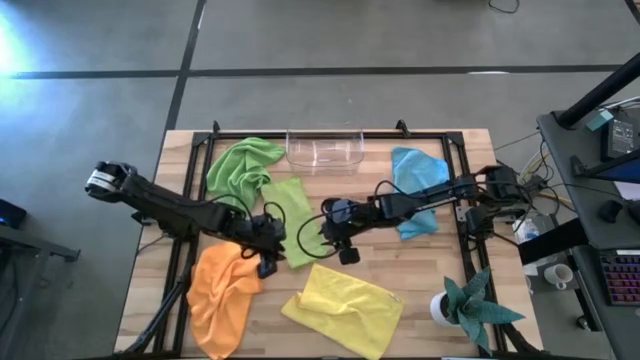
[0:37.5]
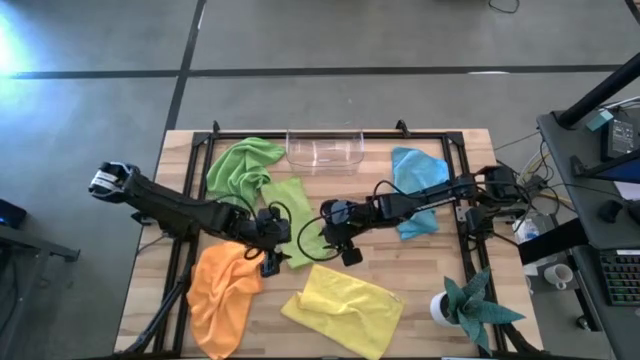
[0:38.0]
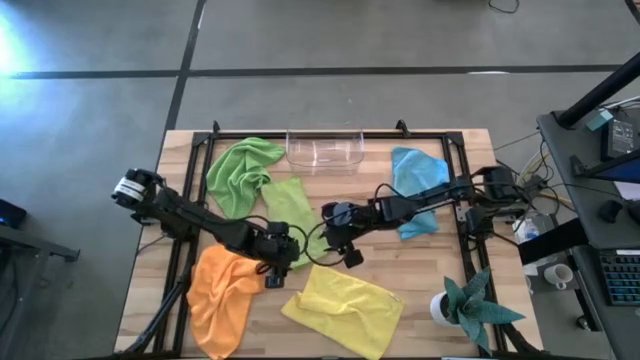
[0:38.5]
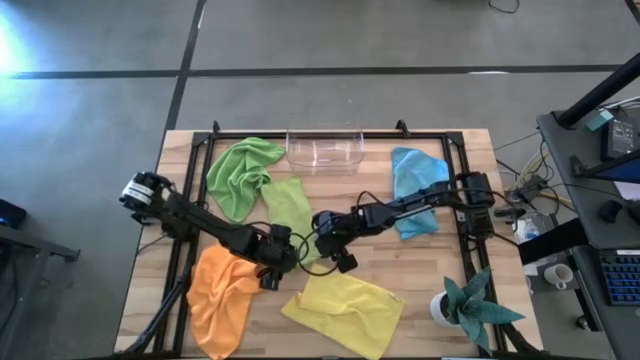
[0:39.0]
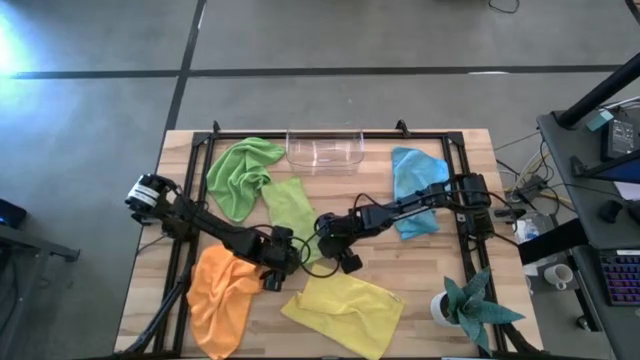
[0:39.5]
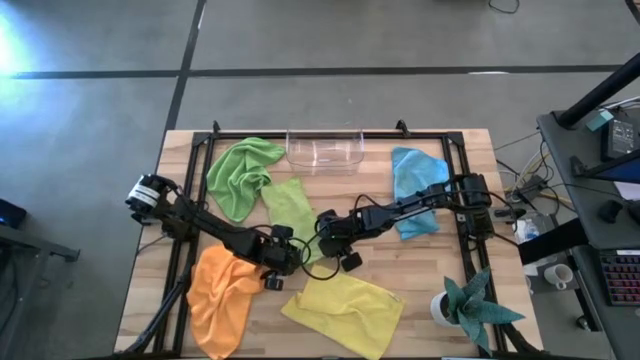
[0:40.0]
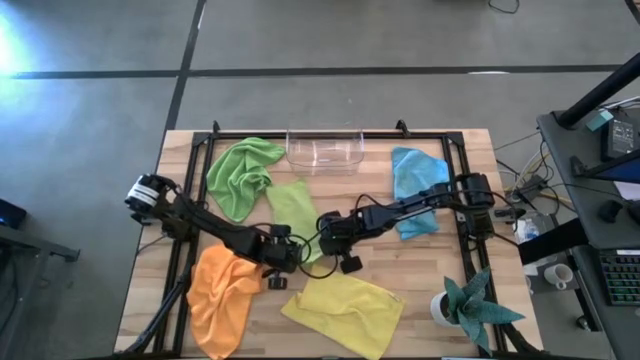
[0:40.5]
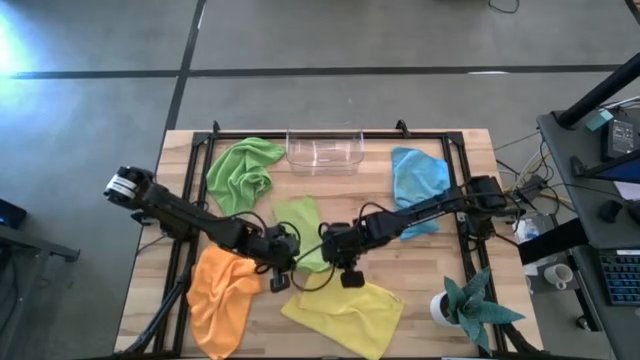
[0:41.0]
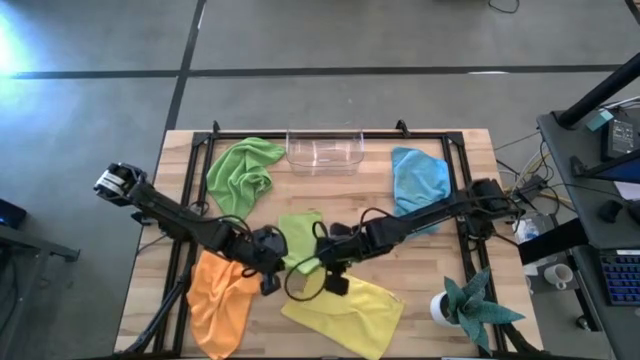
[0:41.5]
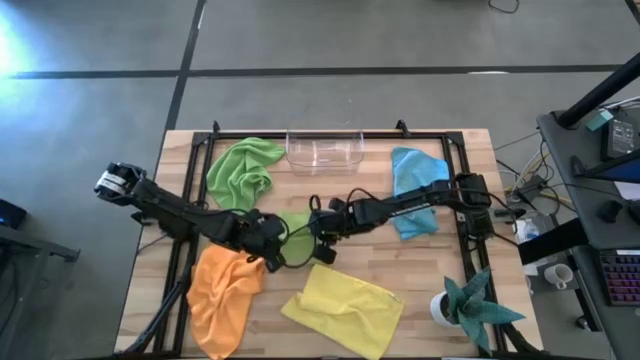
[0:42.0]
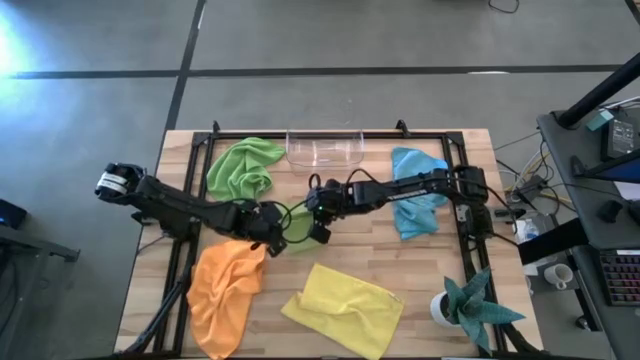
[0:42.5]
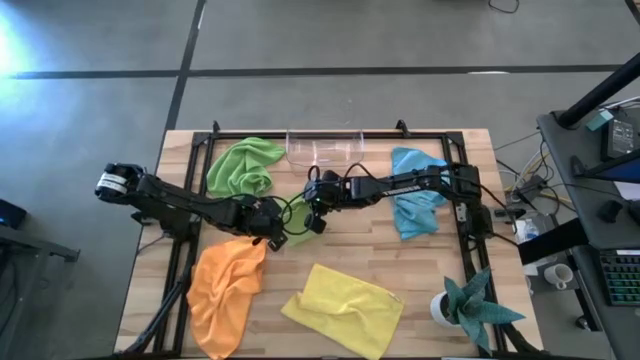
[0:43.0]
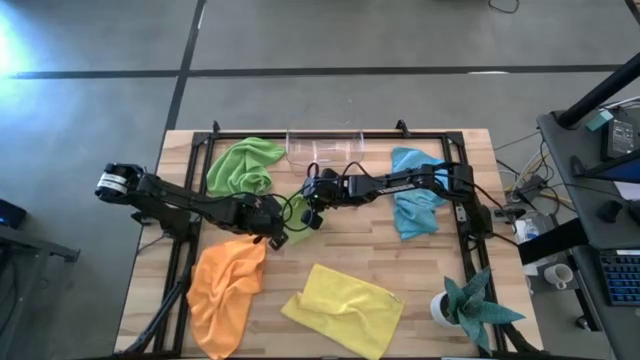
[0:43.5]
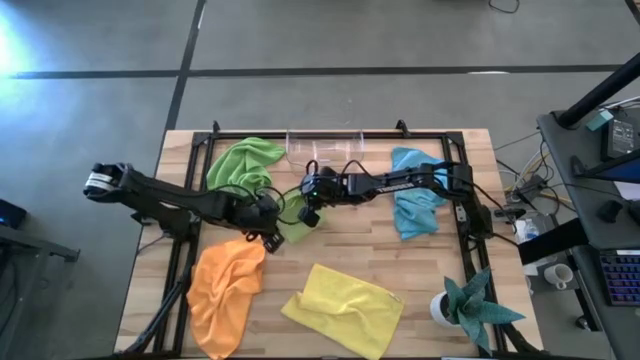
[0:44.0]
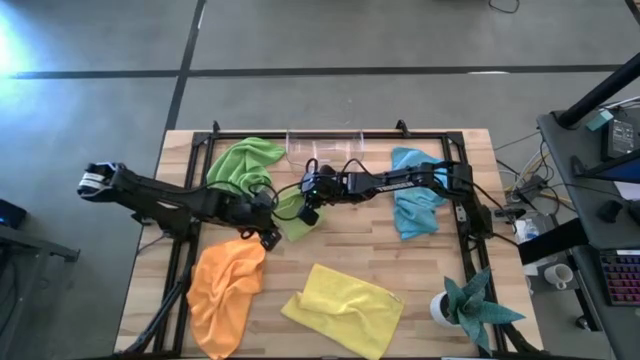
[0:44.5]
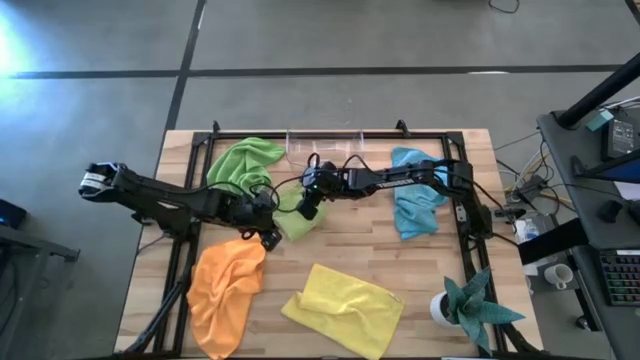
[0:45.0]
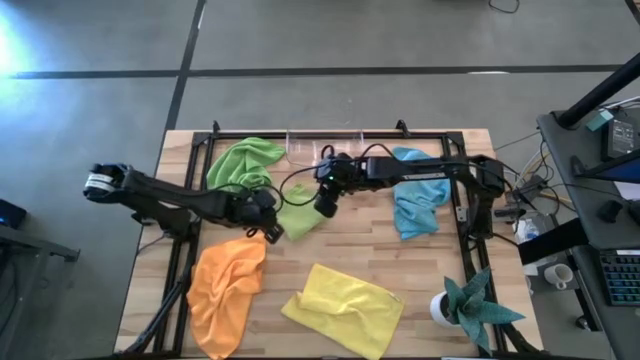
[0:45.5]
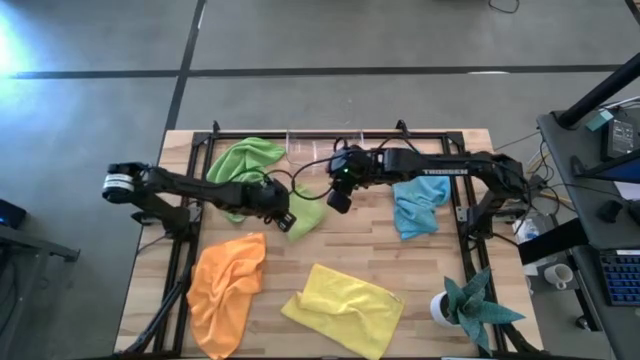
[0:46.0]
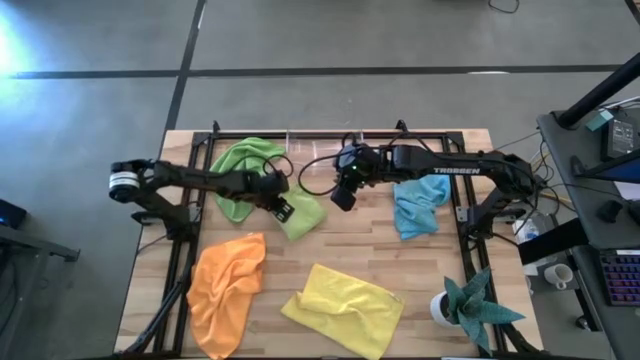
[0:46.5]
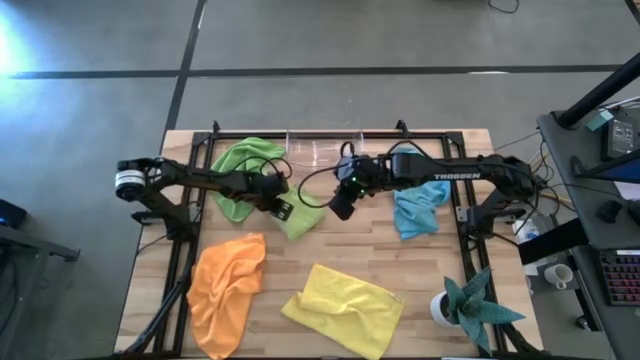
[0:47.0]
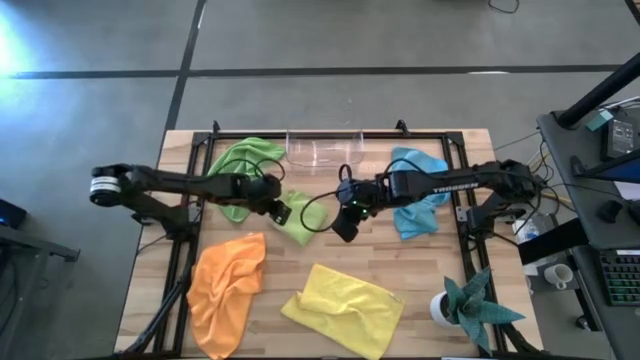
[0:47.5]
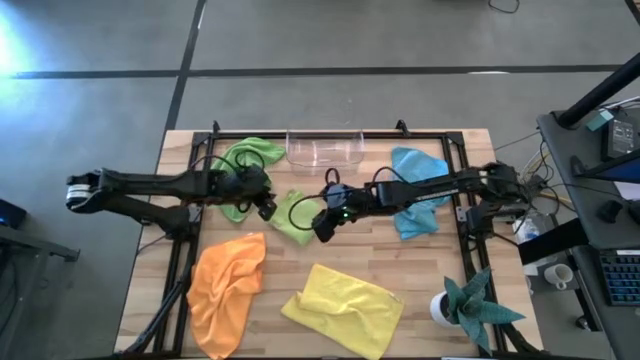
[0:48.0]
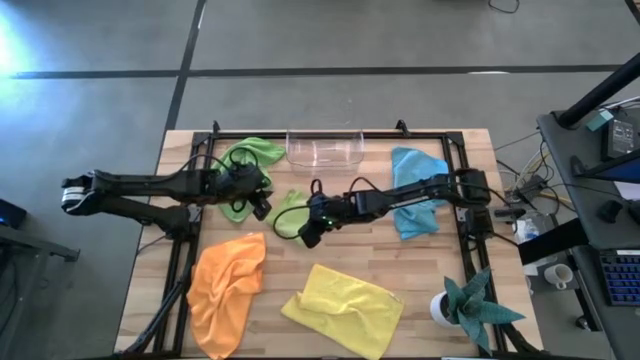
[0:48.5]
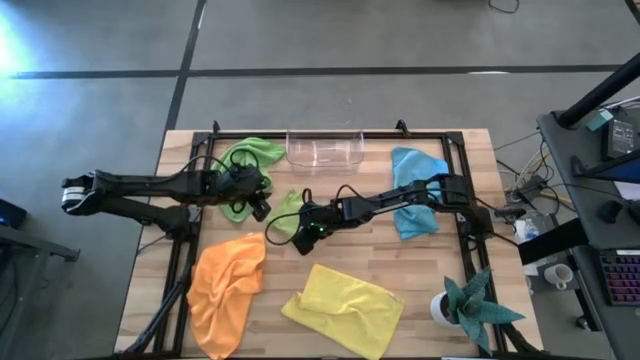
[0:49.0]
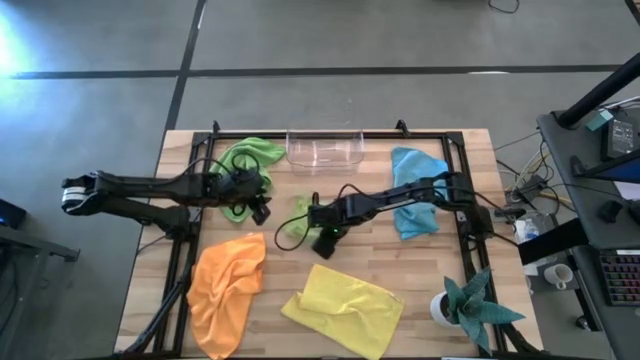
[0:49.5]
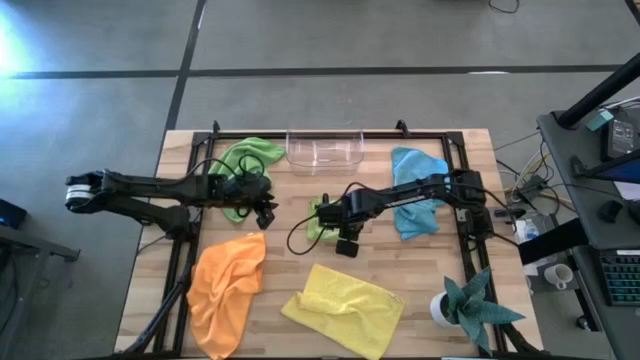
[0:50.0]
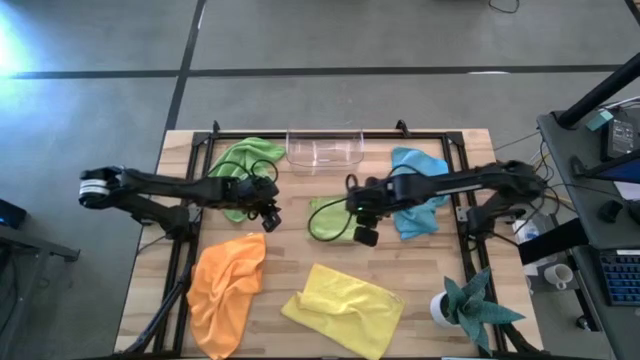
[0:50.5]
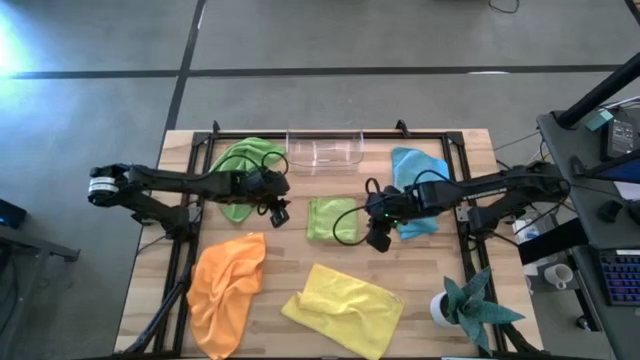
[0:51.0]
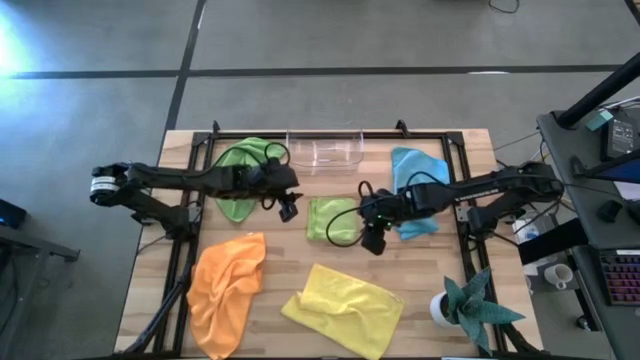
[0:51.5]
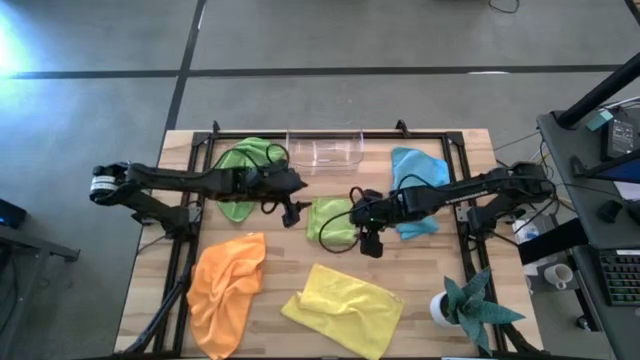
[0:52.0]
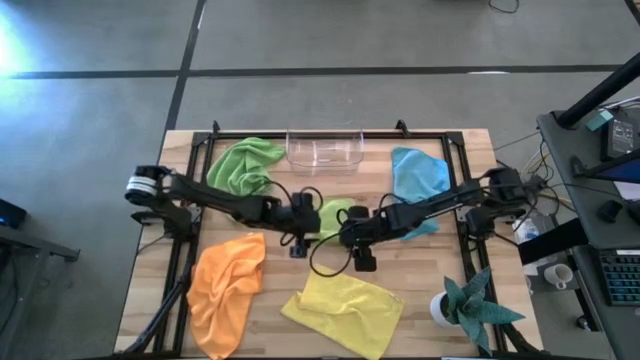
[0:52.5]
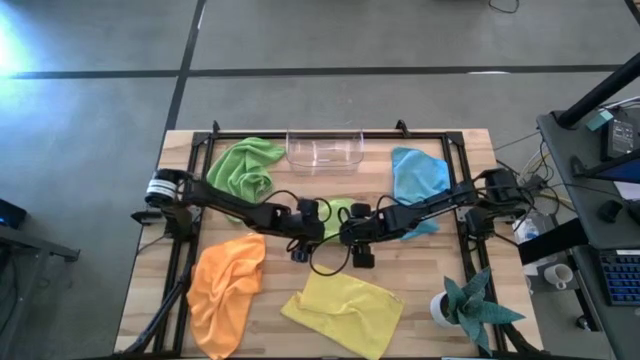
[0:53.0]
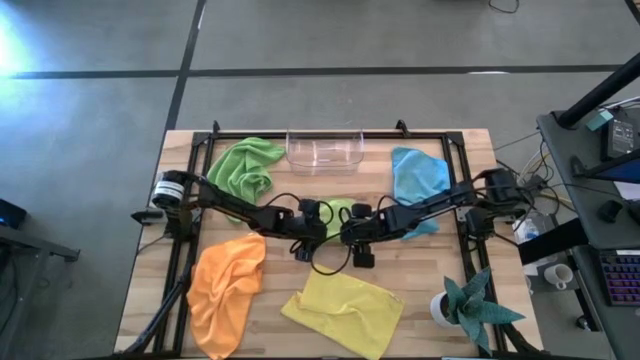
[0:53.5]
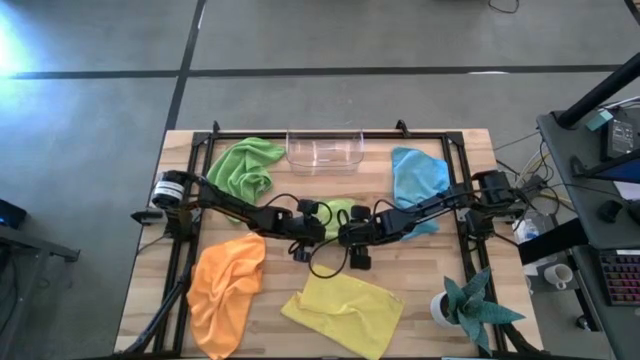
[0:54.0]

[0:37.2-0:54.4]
Task: Fold microfiber towels
Fold the green microfiber towel

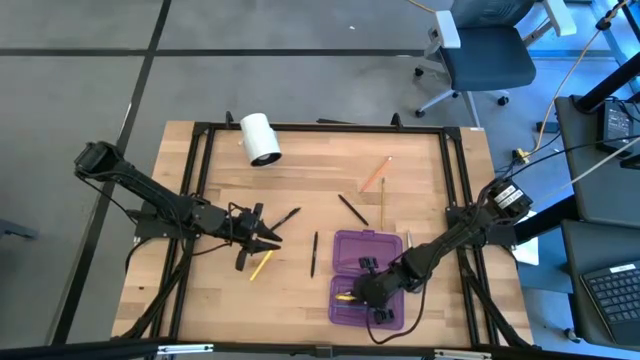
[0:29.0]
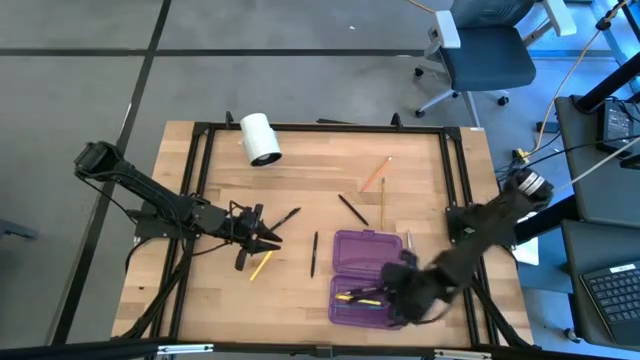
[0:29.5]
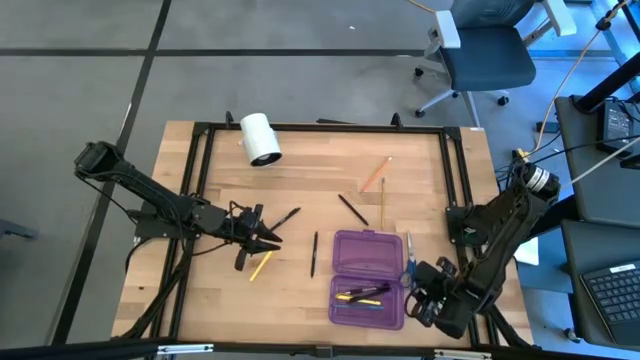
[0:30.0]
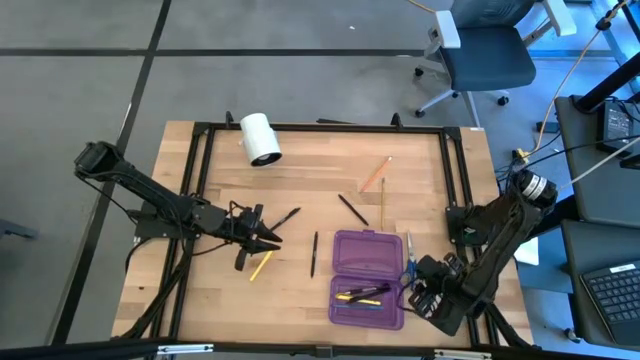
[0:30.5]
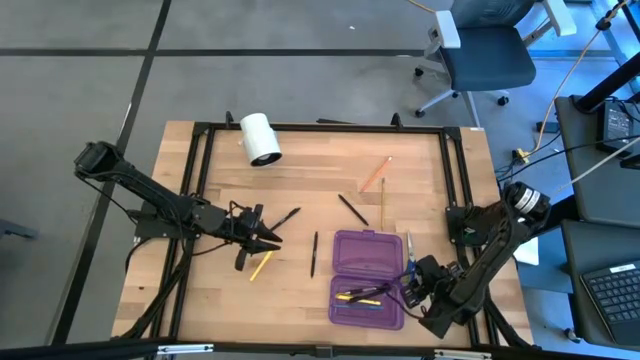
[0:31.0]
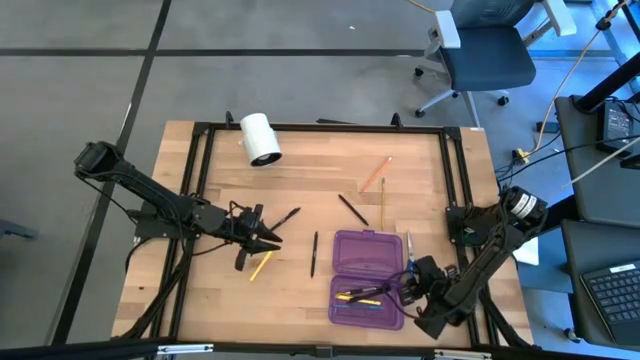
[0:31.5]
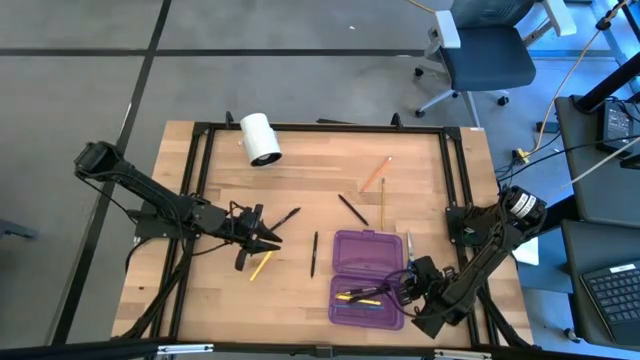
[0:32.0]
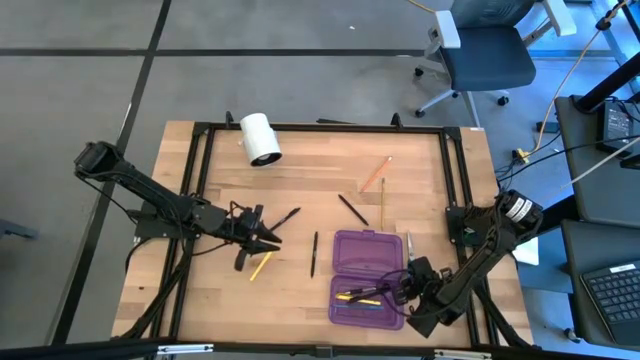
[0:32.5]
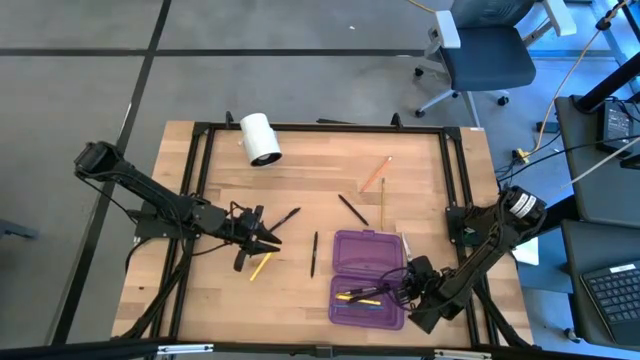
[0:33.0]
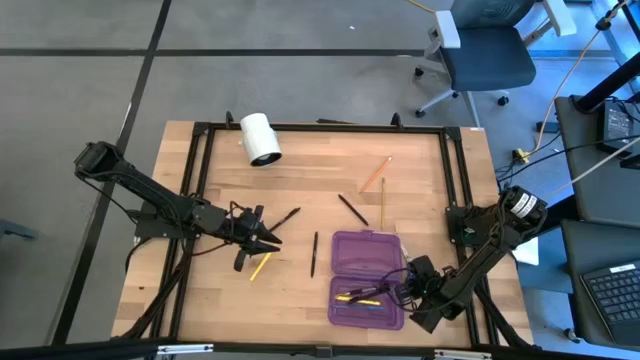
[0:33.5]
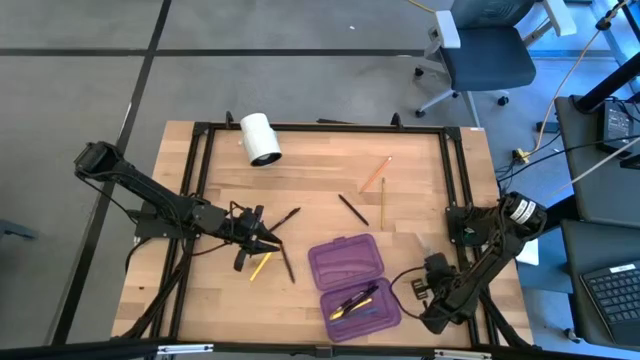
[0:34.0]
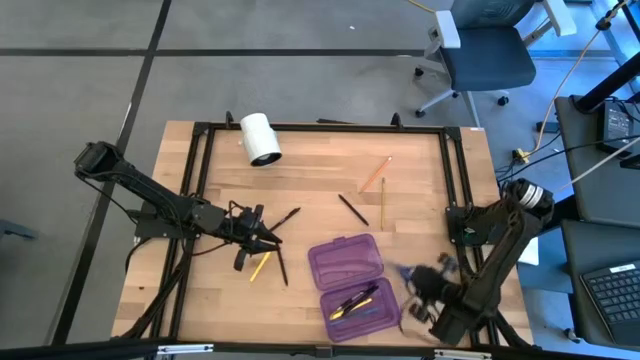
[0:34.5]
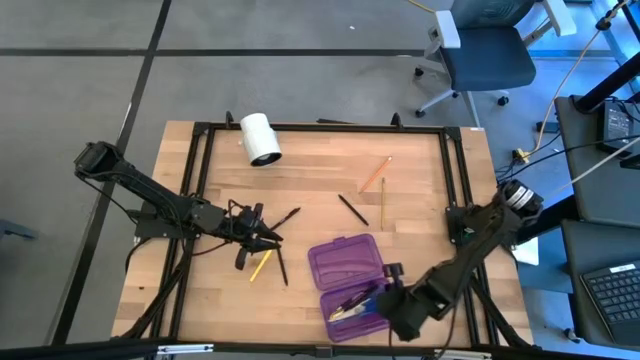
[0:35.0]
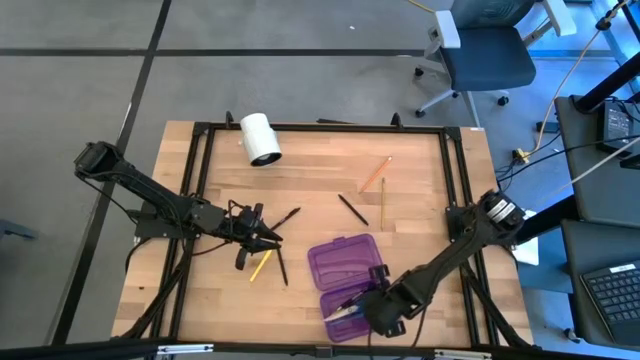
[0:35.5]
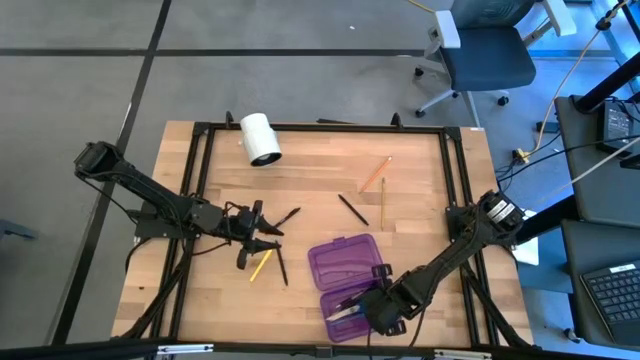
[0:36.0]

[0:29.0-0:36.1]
Task: Pick & place school supplies into a supply box
Put the blue scissors into the purple supply box
